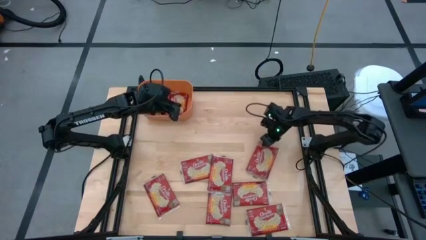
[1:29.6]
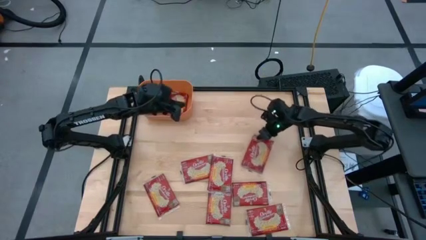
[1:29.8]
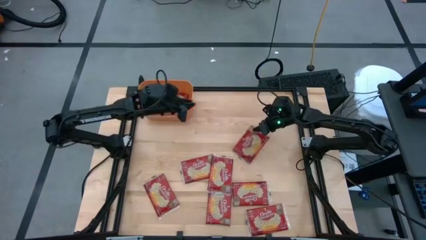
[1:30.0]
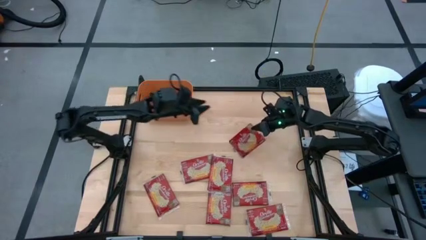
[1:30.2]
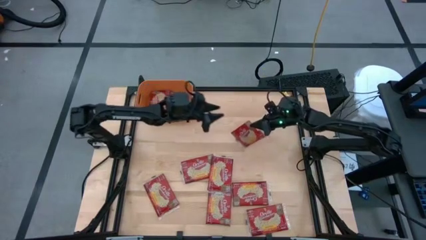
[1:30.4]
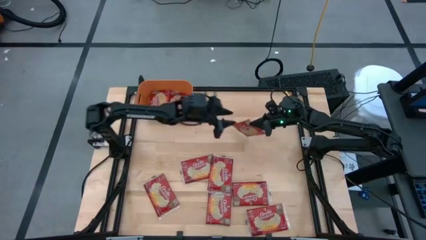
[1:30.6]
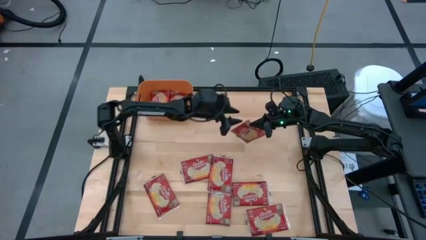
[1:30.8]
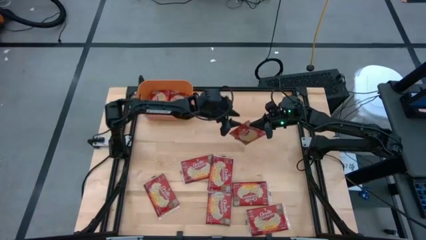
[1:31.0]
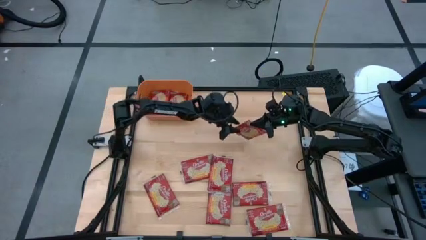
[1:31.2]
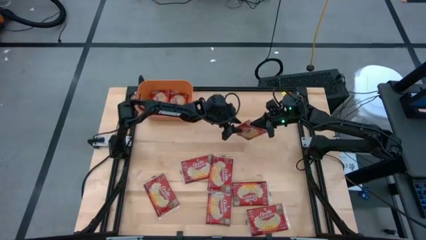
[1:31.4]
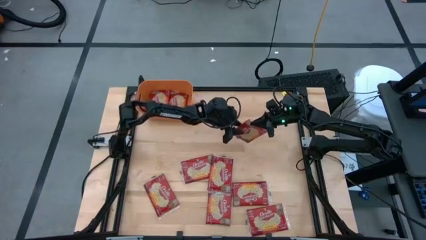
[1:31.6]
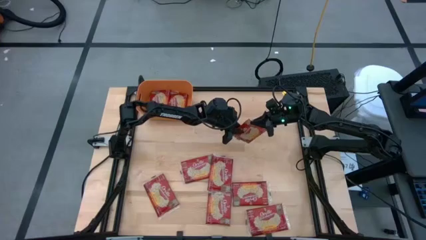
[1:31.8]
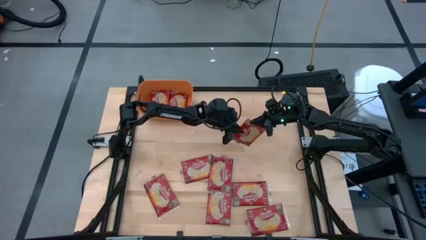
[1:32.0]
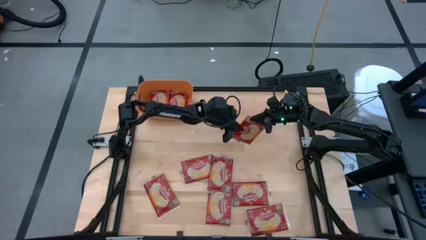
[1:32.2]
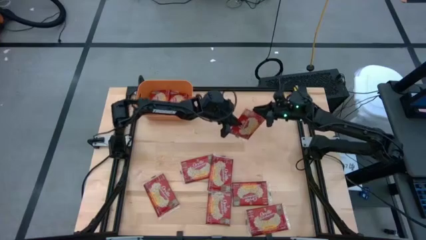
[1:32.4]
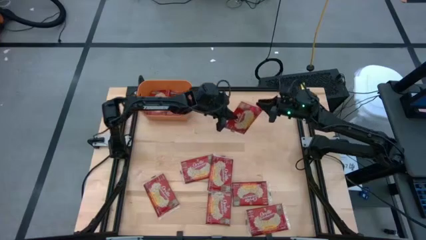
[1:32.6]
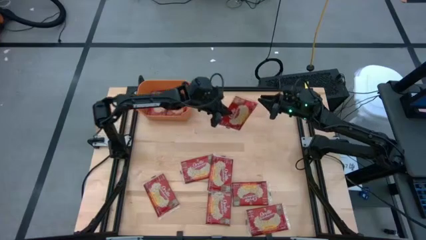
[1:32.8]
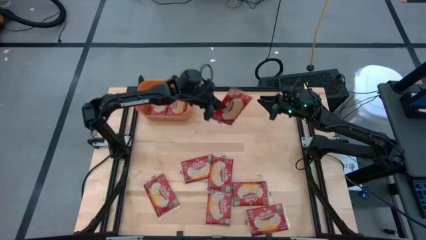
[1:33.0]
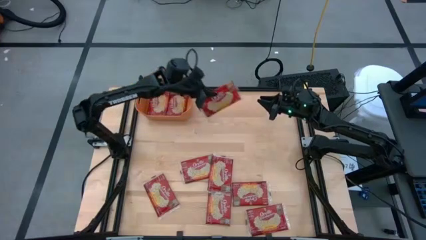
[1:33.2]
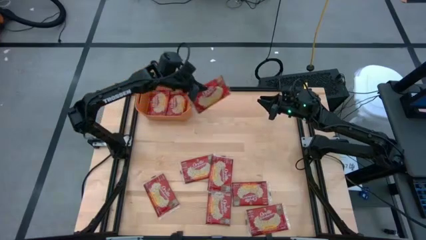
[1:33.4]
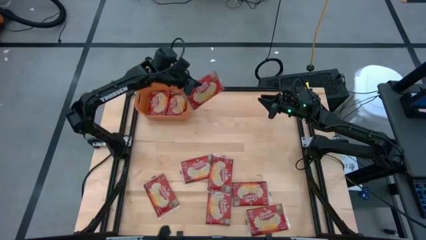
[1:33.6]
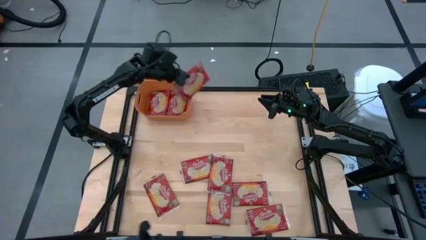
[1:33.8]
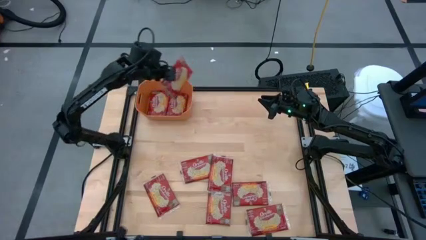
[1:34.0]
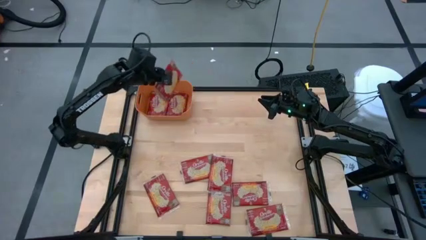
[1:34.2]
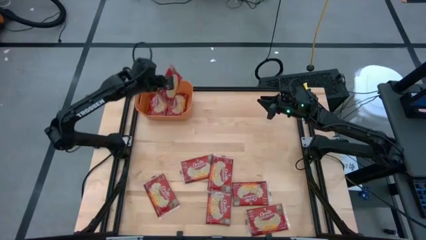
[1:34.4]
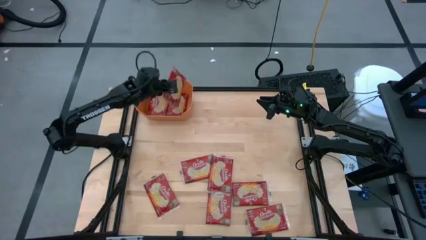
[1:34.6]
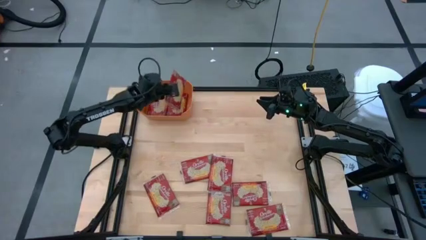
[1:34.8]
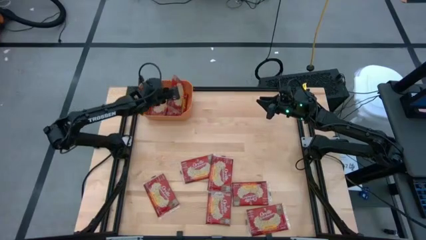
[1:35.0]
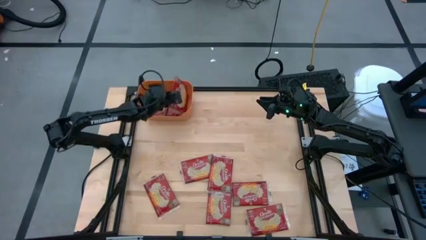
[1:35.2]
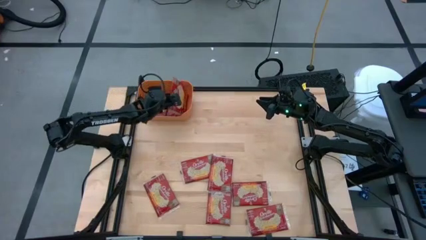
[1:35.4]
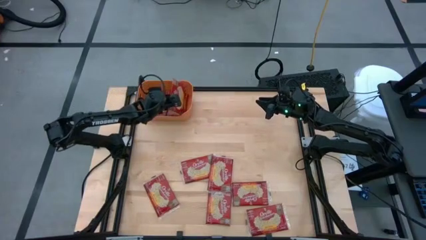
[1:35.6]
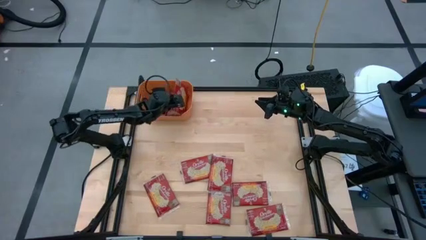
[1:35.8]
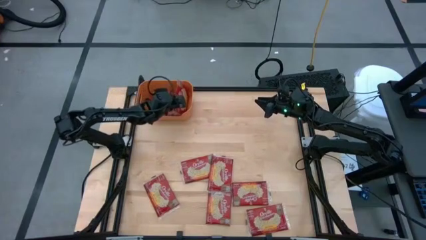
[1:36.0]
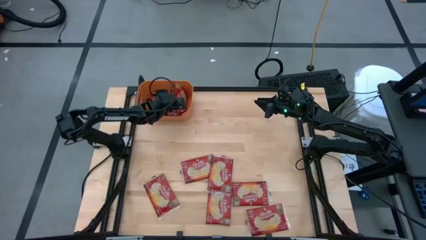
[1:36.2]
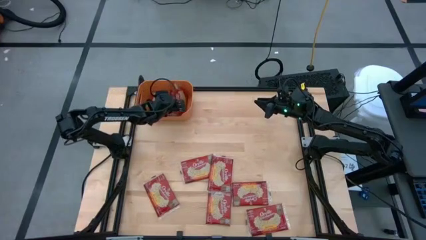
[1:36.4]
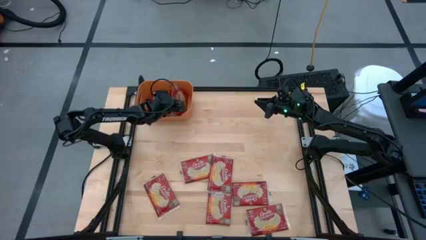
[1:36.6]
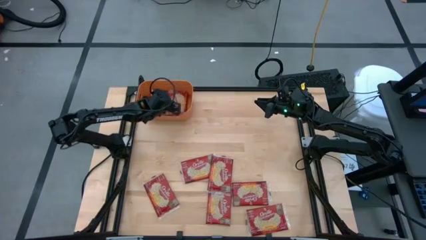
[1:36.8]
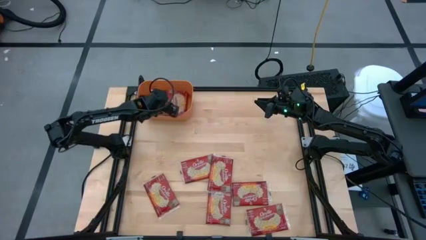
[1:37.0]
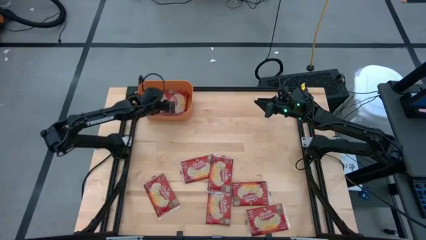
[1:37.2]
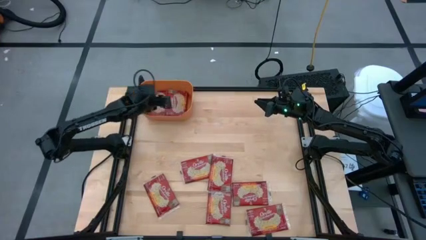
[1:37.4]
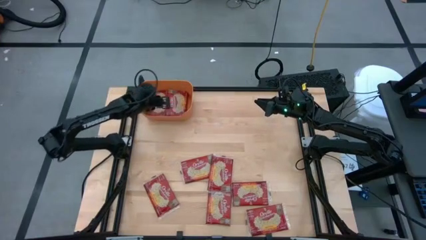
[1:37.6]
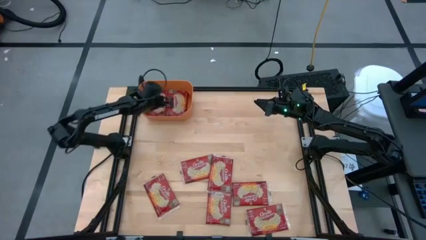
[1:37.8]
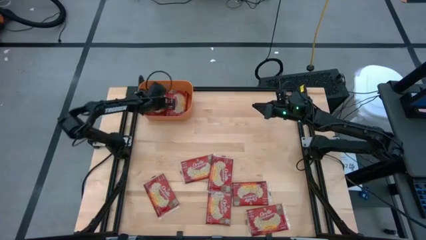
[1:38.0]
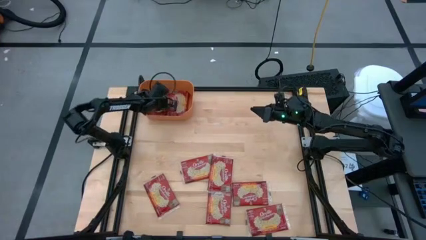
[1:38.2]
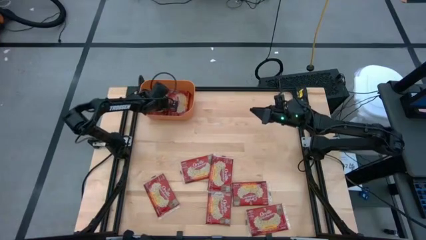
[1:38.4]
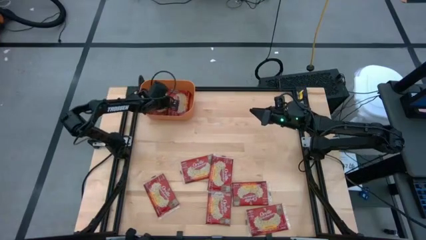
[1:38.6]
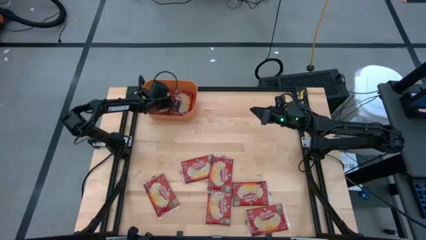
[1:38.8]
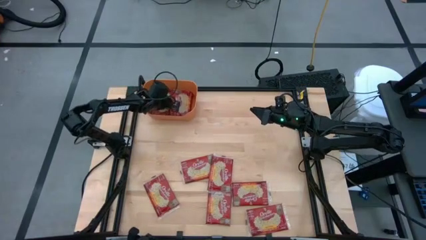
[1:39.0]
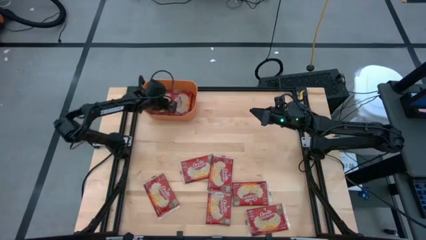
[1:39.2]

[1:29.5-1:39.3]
Task: Sort popcorn bags into baskets
Stack the red popcorn bag on top of the red popcorn bag in the orange bin
